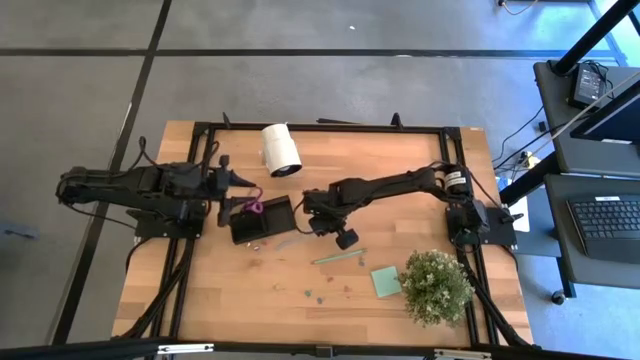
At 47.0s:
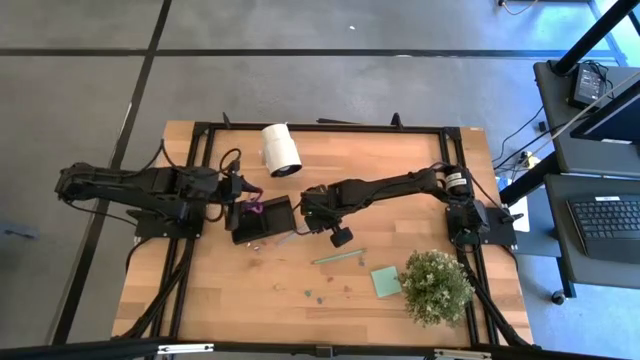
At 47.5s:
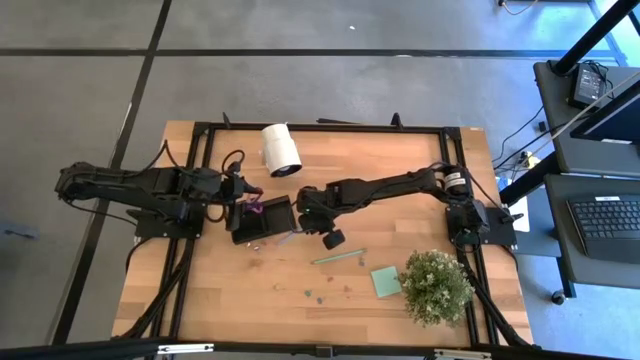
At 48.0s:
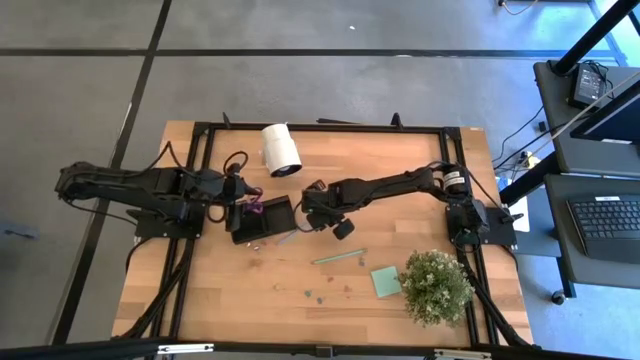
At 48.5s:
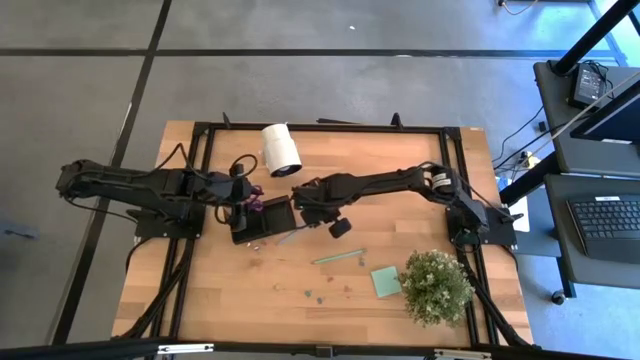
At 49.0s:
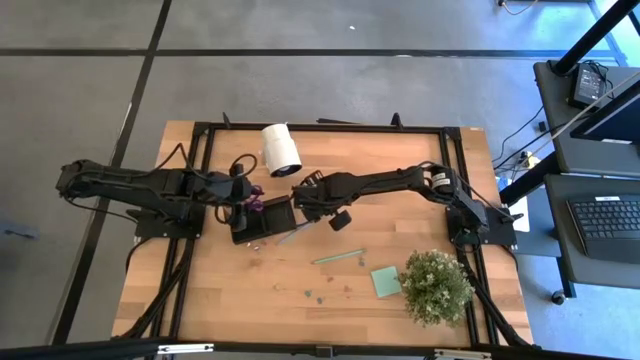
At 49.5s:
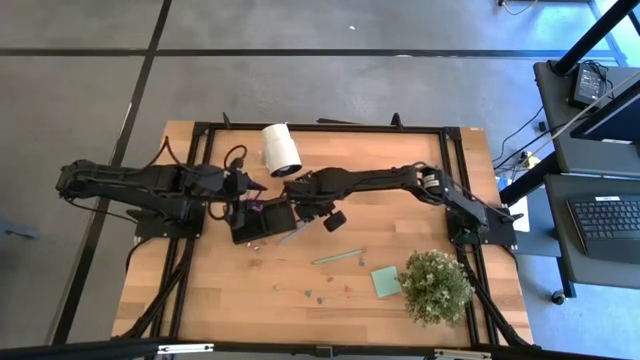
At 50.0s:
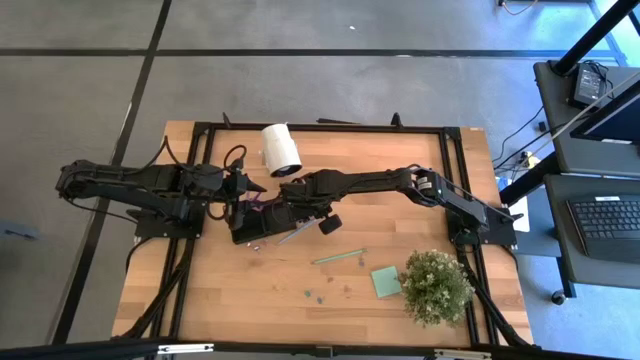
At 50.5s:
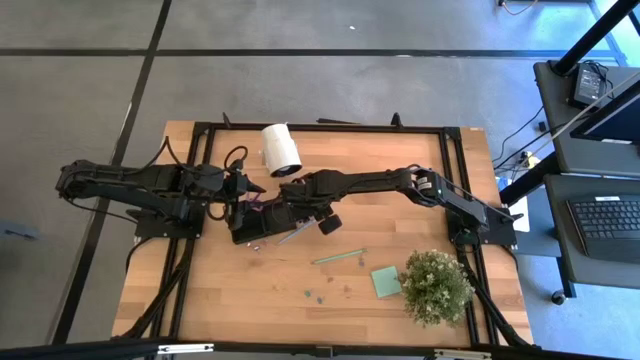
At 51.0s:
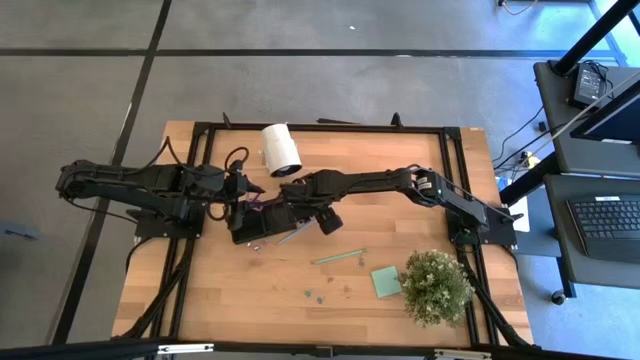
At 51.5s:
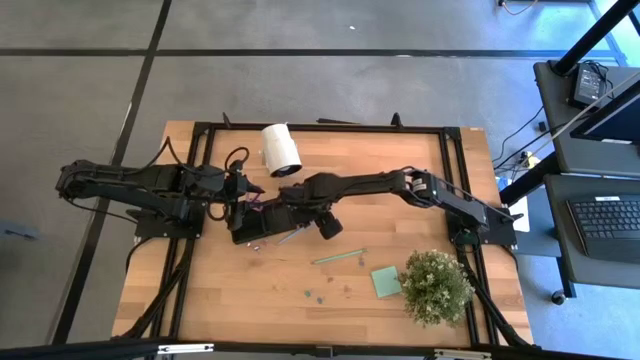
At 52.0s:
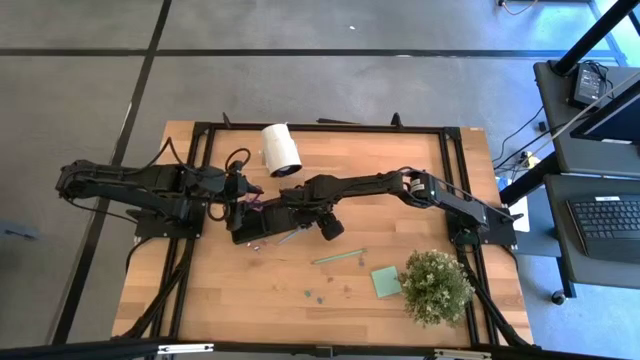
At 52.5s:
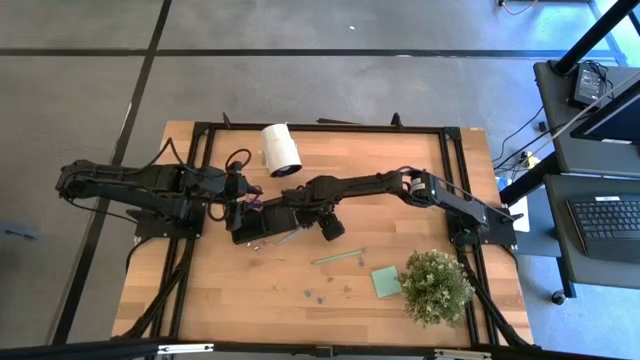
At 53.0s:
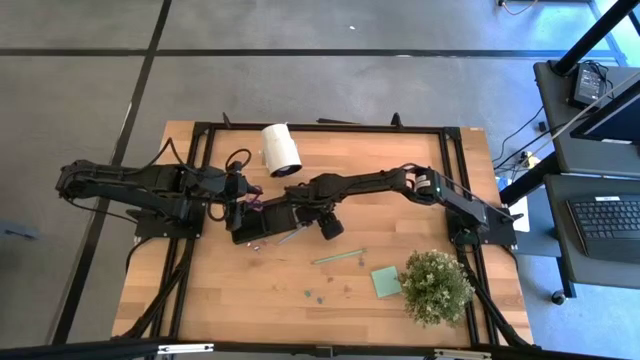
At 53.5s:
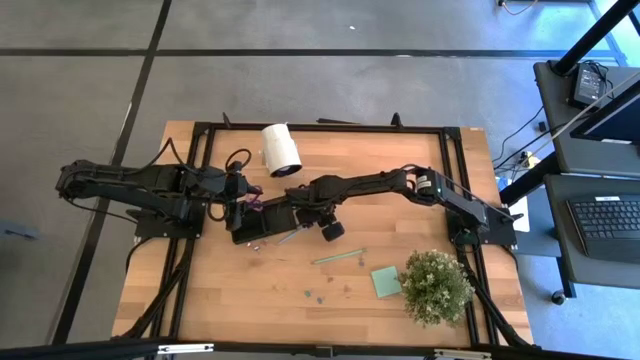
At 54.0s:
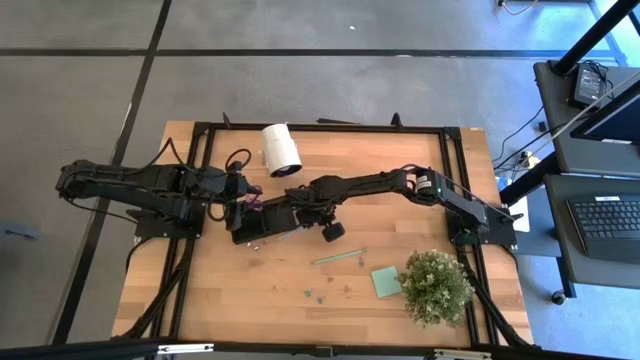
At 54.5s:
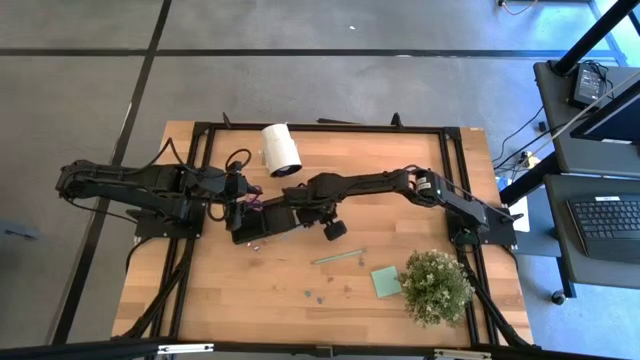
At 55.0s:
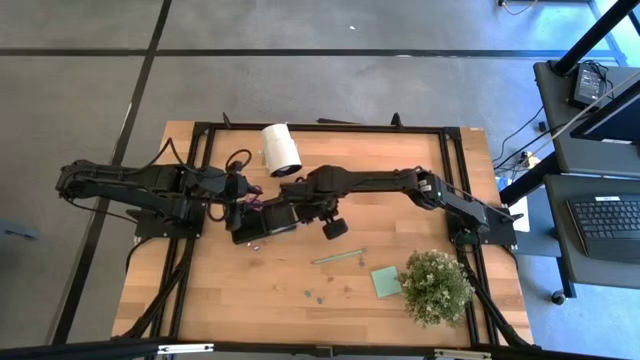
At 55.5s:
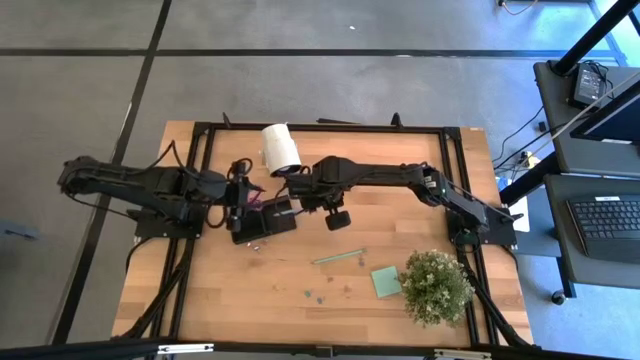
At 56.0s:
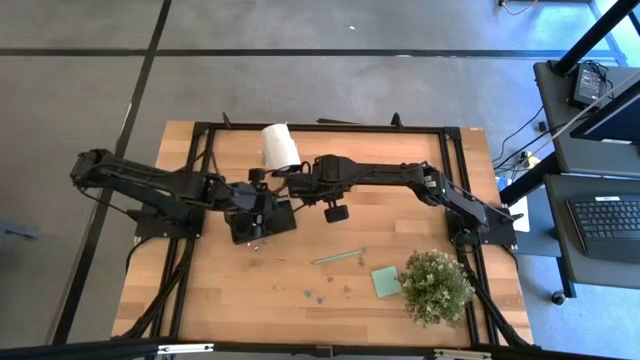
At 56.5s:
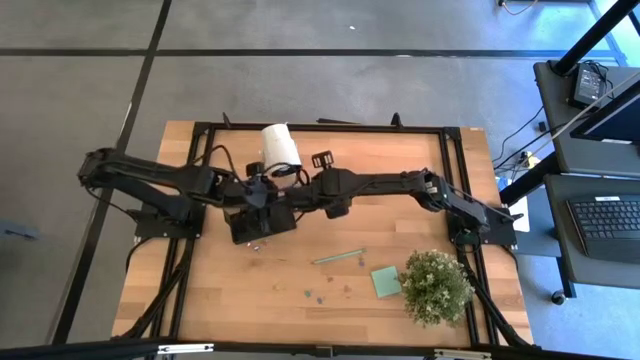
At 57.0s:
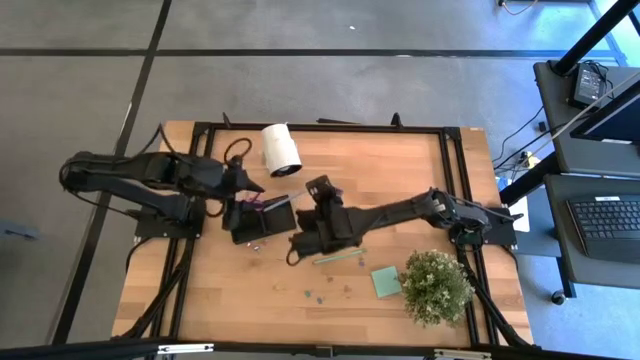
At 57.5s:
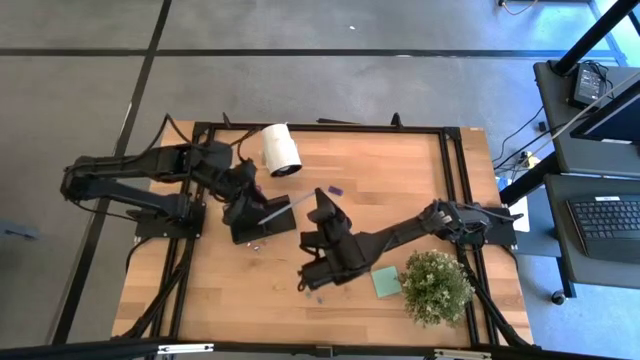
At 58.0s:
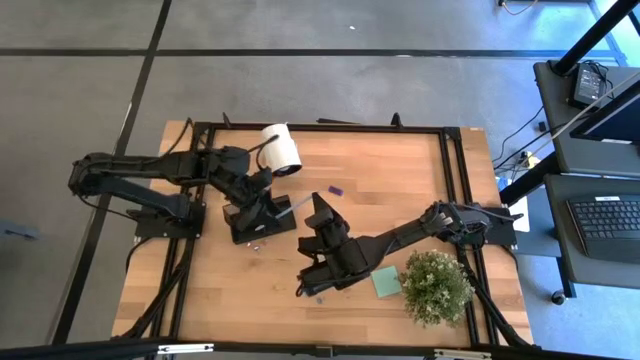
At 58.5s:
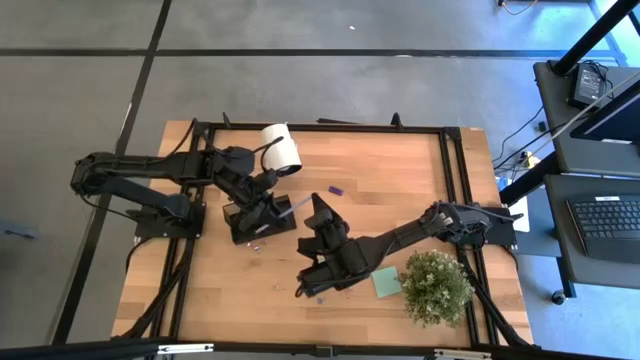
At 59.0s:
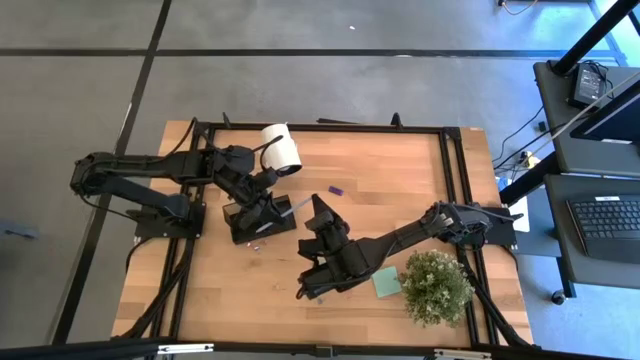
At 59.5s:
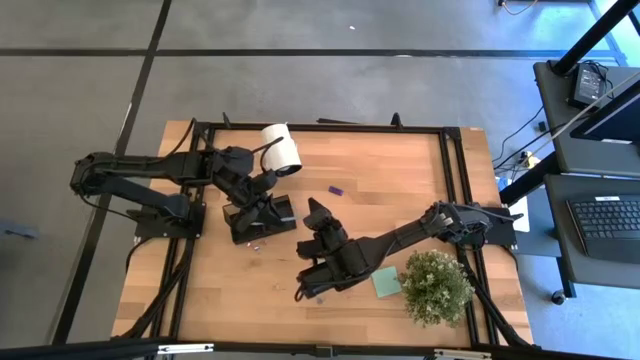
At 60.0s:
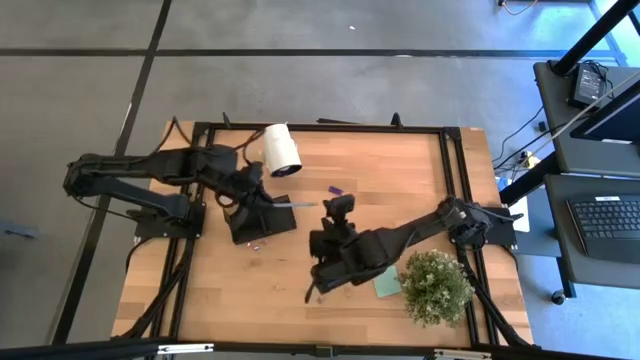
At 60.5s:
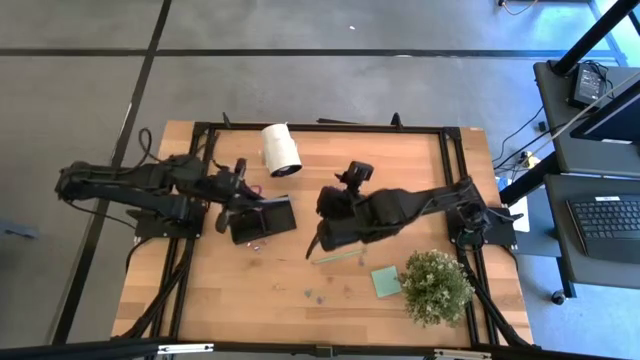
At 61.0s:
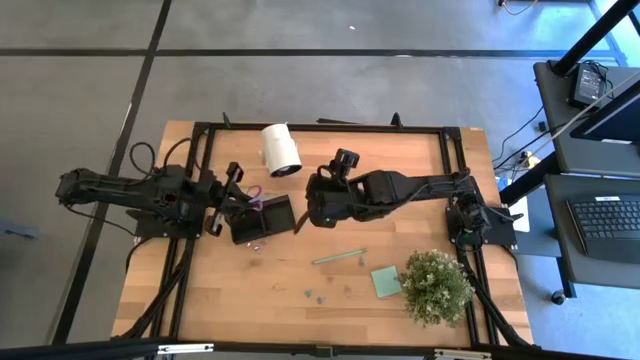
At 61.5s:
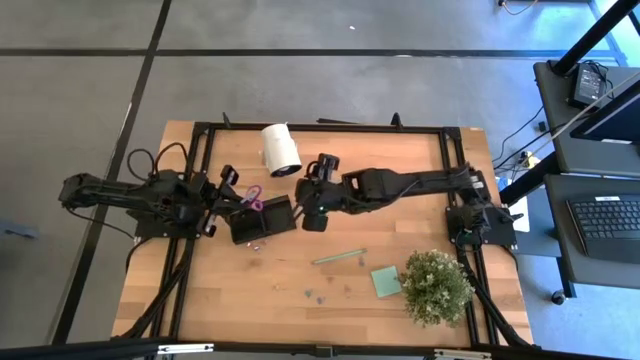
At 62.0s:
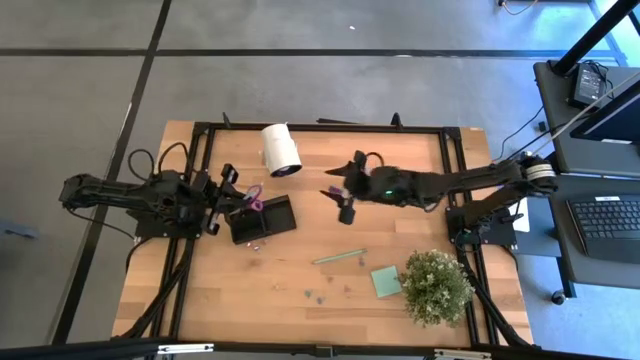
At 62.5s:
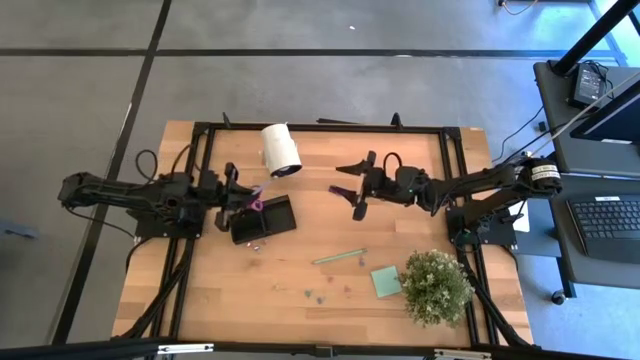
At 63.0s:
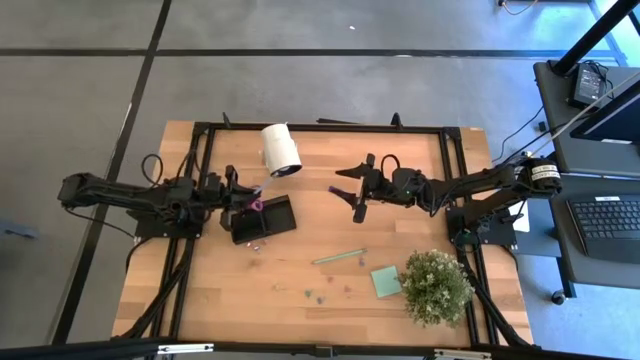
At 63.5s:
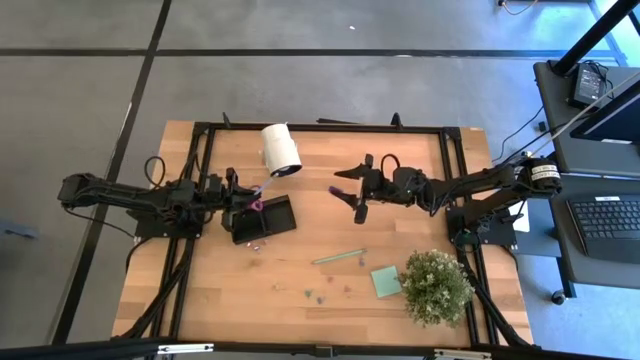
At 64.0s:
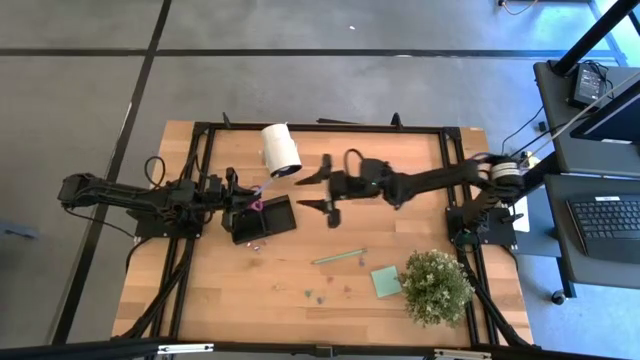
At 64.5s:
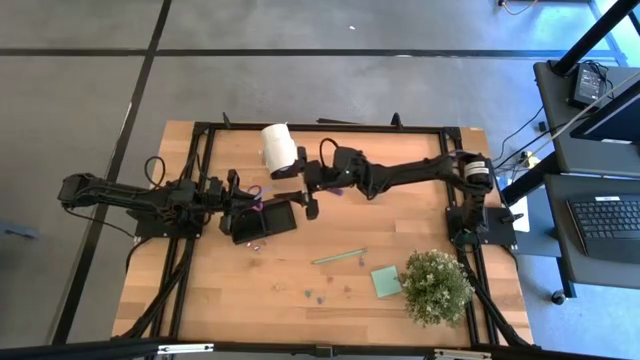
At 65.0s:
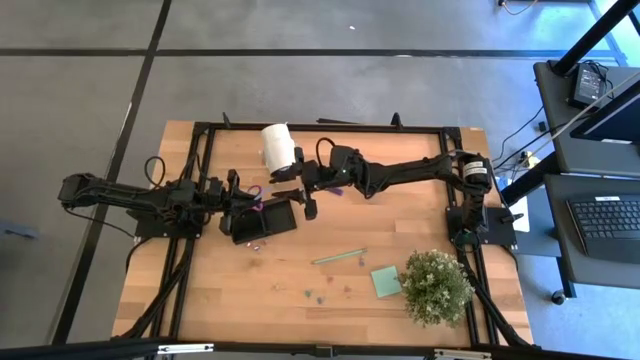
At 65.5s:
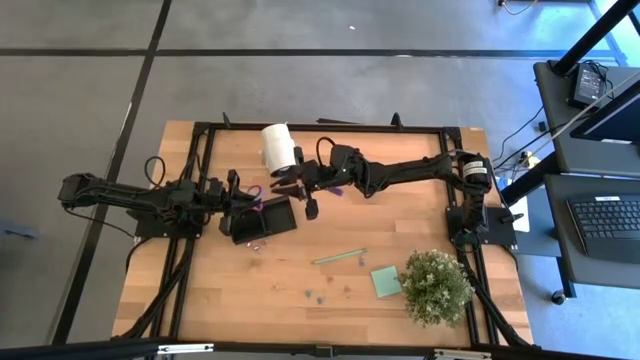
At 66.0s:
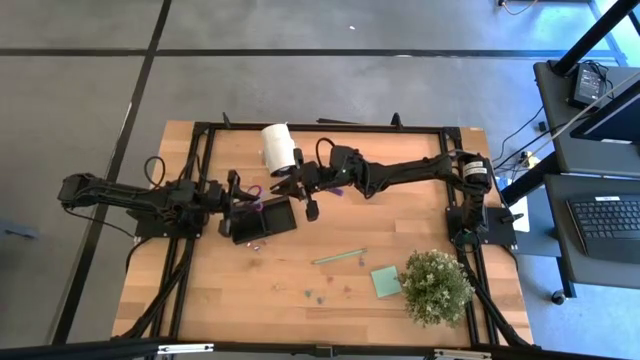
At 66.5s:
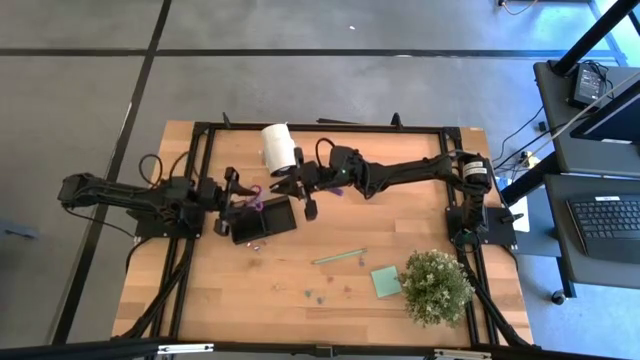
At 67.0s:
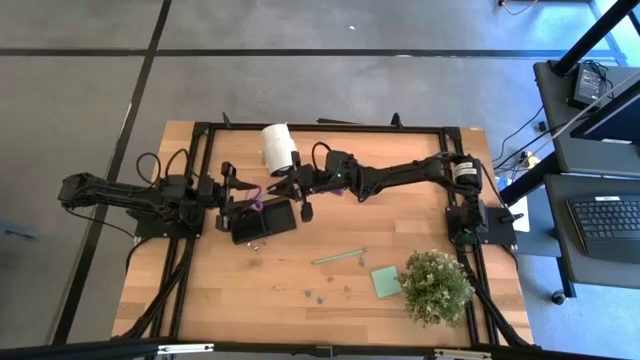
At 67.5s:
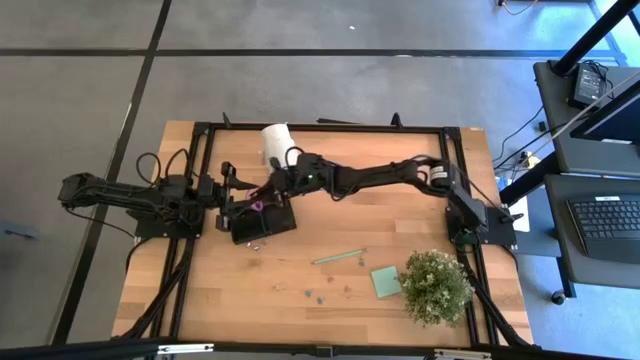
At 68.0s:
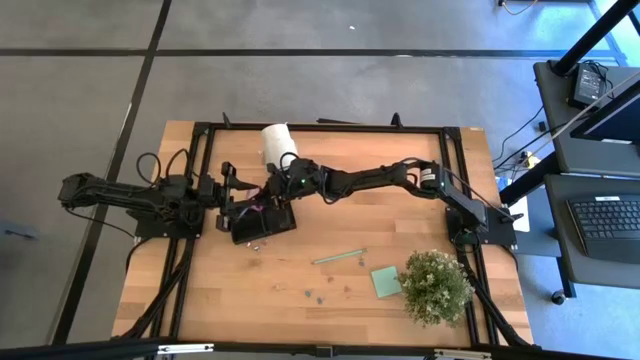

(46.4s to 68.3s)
Task: Pick and place office supplies into organizer
Put the blue pencil into the black desk organizer
